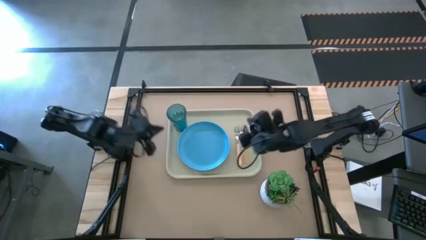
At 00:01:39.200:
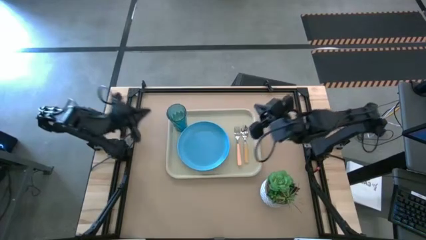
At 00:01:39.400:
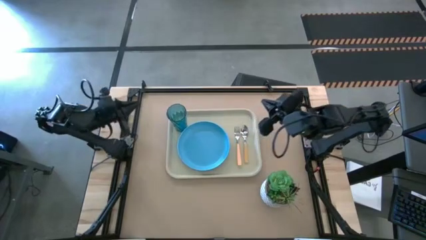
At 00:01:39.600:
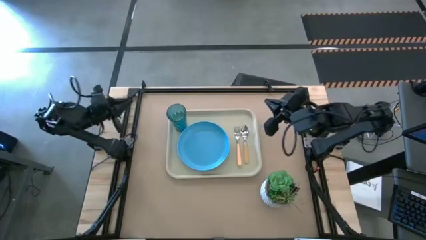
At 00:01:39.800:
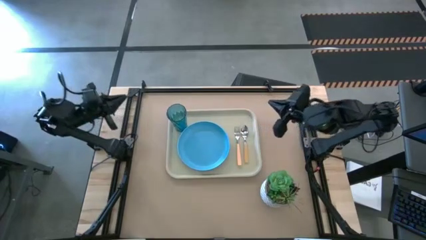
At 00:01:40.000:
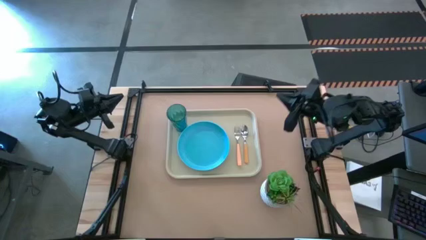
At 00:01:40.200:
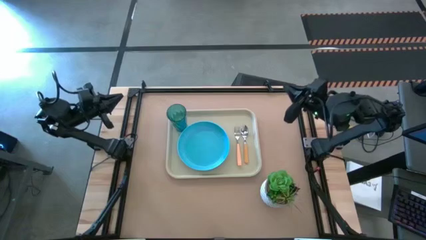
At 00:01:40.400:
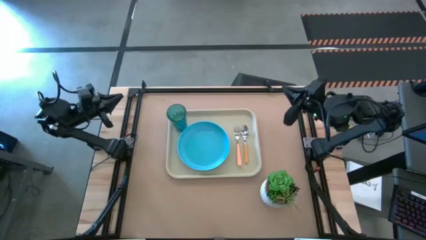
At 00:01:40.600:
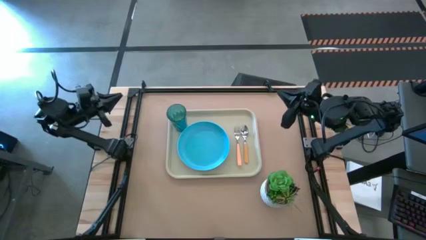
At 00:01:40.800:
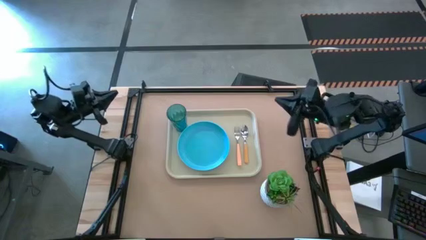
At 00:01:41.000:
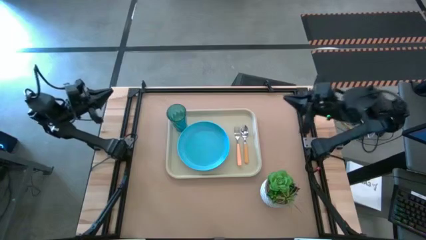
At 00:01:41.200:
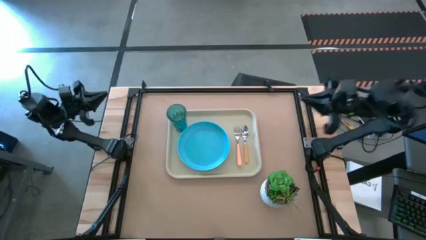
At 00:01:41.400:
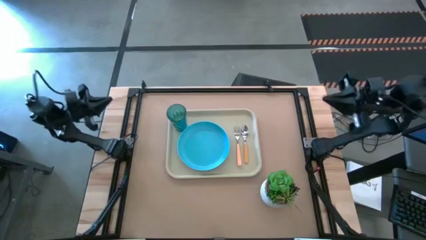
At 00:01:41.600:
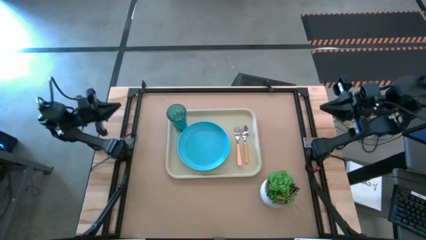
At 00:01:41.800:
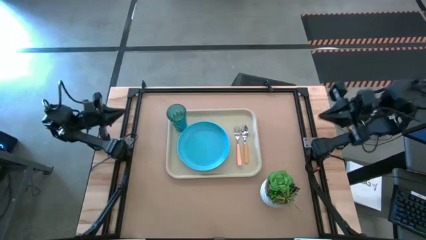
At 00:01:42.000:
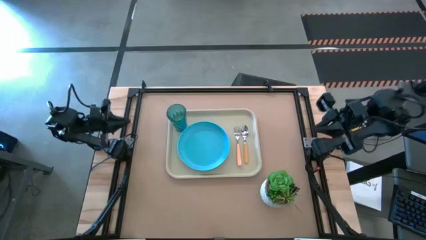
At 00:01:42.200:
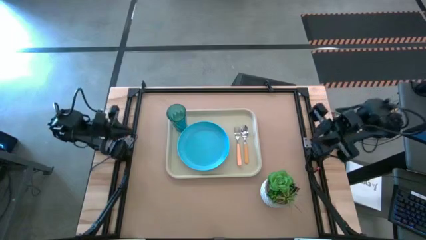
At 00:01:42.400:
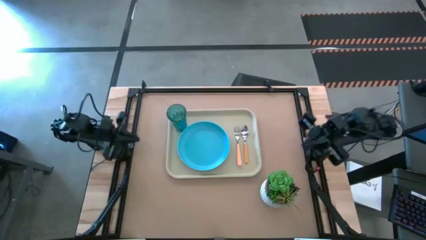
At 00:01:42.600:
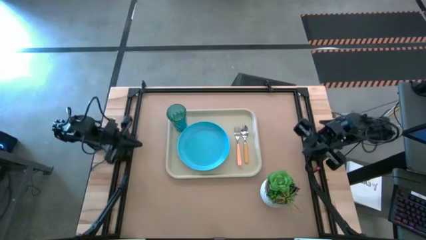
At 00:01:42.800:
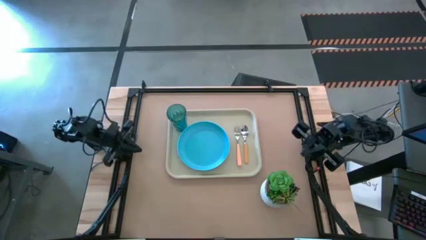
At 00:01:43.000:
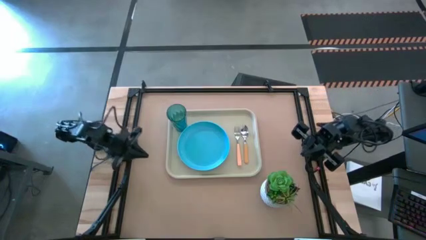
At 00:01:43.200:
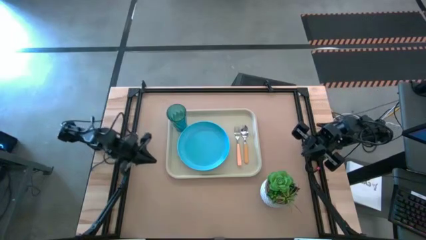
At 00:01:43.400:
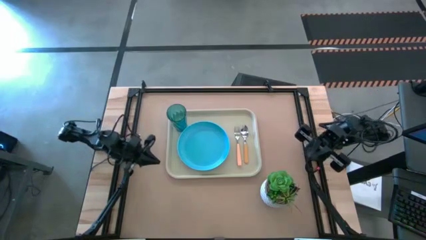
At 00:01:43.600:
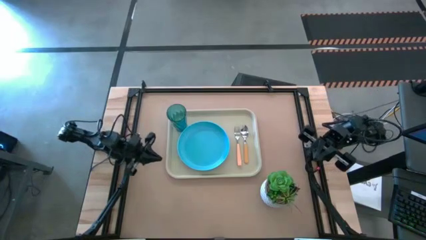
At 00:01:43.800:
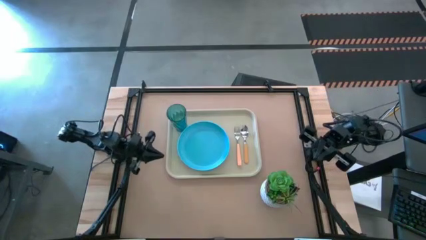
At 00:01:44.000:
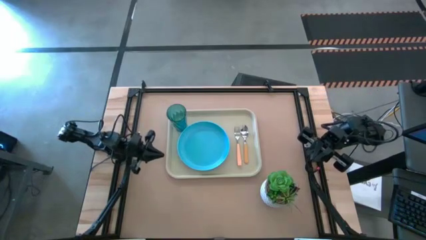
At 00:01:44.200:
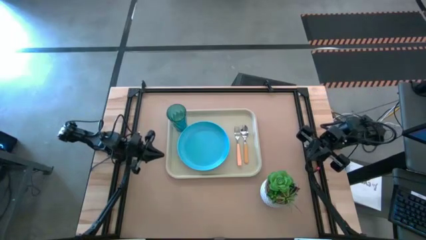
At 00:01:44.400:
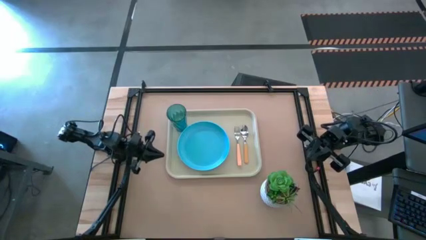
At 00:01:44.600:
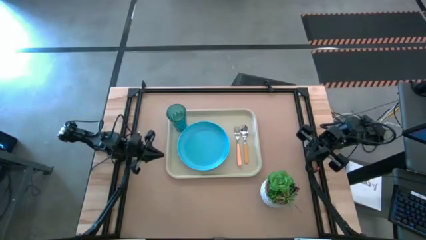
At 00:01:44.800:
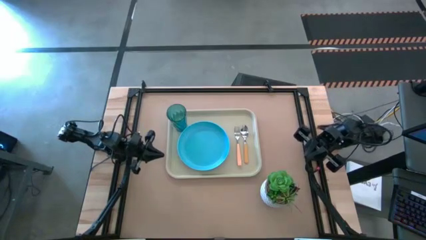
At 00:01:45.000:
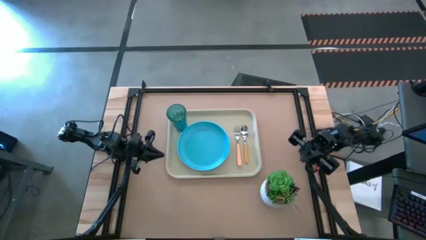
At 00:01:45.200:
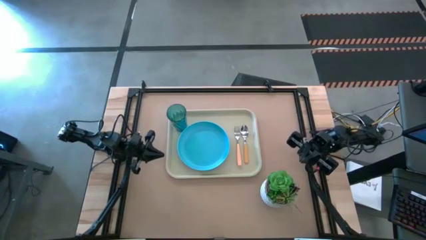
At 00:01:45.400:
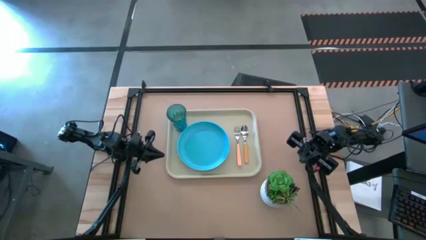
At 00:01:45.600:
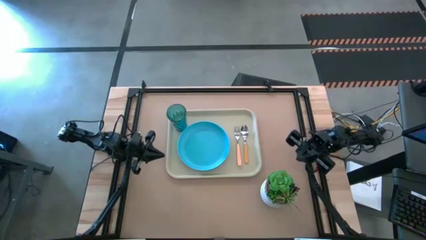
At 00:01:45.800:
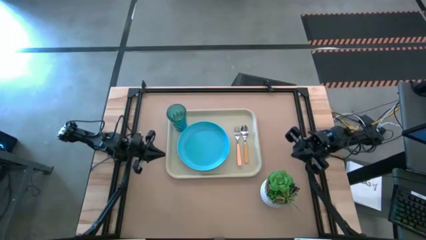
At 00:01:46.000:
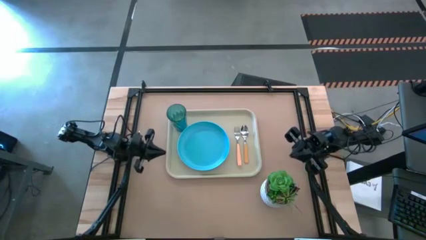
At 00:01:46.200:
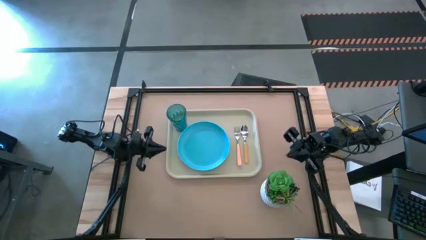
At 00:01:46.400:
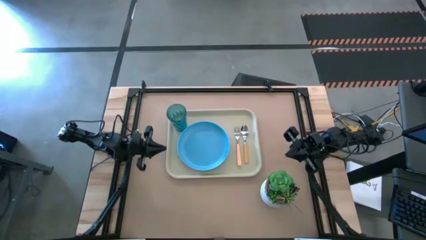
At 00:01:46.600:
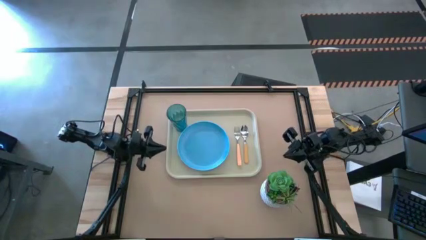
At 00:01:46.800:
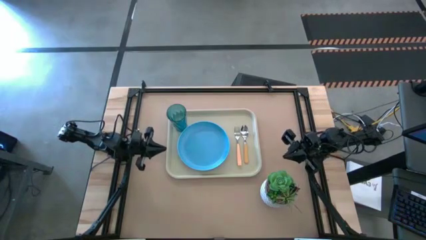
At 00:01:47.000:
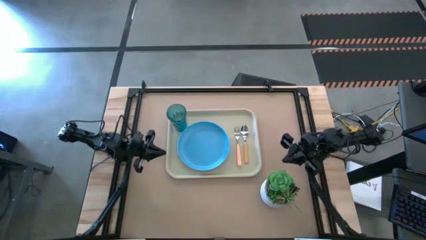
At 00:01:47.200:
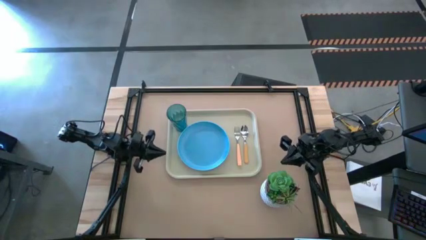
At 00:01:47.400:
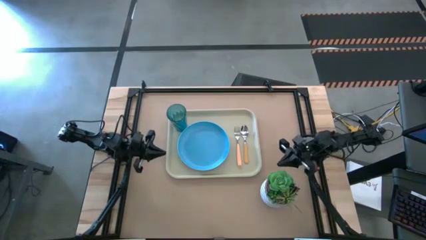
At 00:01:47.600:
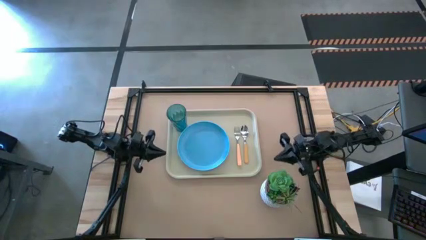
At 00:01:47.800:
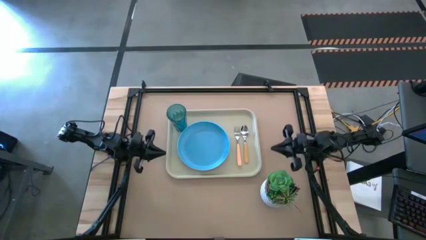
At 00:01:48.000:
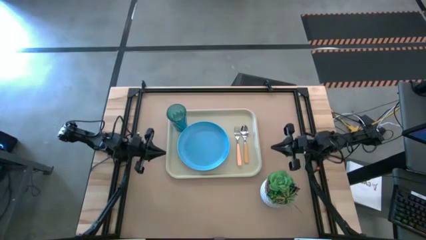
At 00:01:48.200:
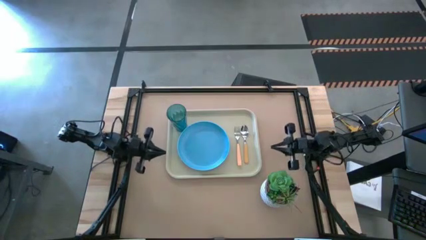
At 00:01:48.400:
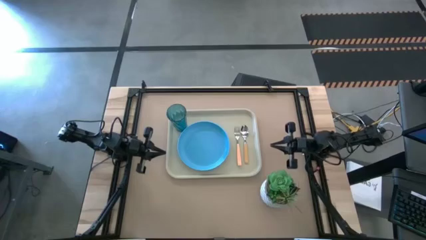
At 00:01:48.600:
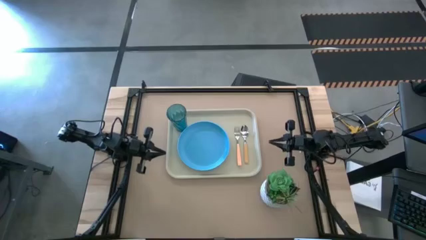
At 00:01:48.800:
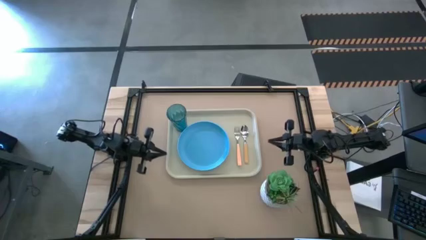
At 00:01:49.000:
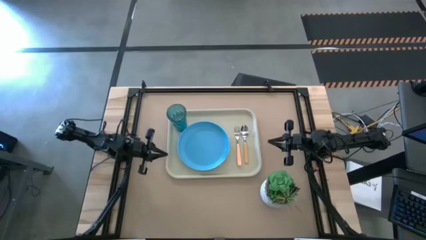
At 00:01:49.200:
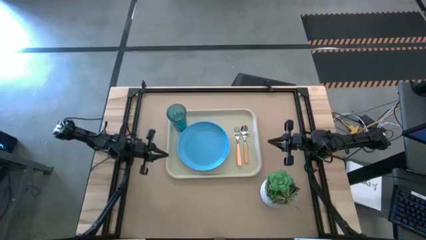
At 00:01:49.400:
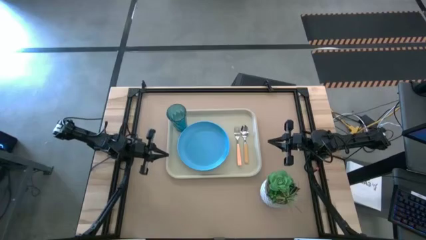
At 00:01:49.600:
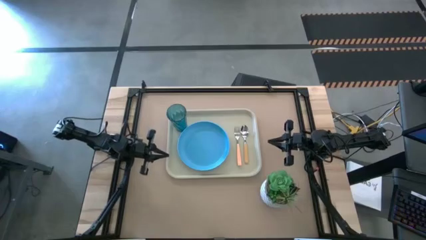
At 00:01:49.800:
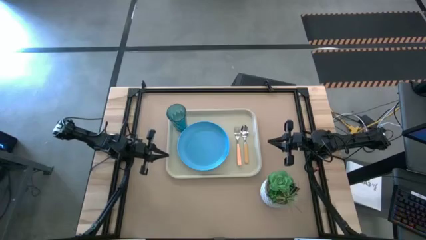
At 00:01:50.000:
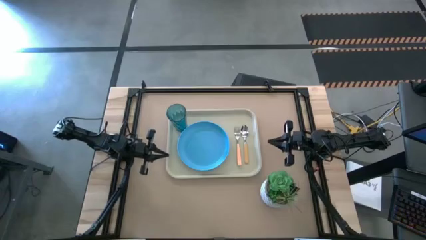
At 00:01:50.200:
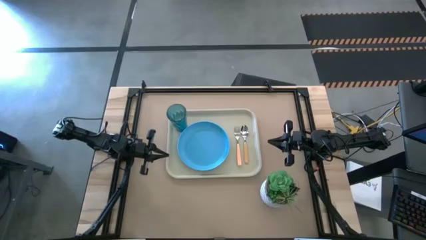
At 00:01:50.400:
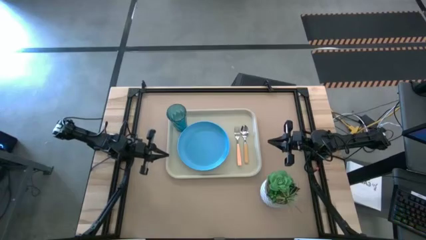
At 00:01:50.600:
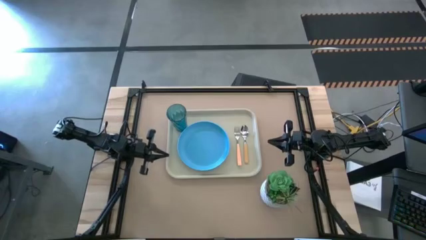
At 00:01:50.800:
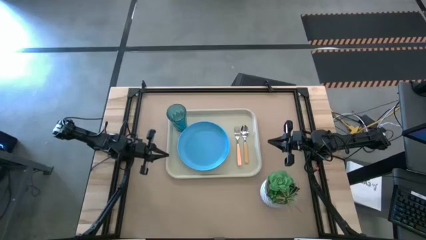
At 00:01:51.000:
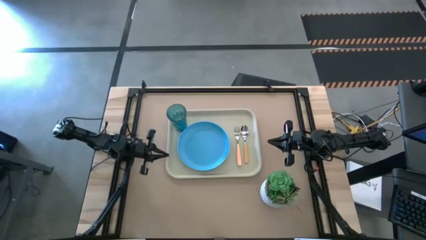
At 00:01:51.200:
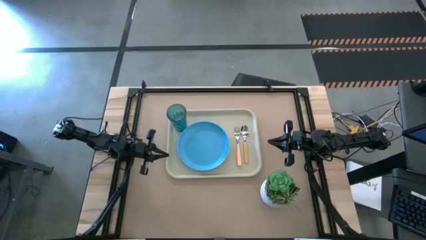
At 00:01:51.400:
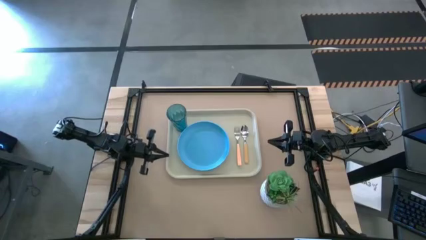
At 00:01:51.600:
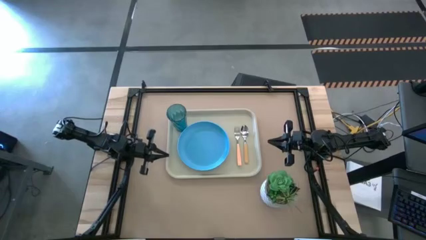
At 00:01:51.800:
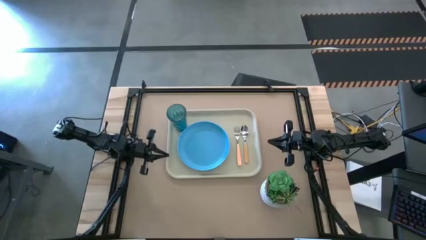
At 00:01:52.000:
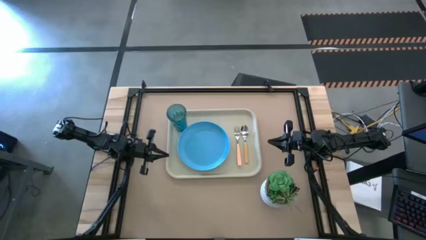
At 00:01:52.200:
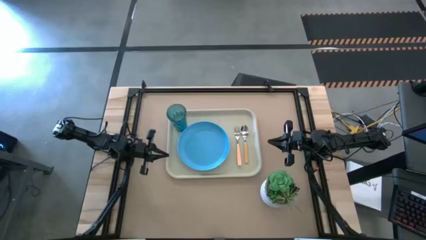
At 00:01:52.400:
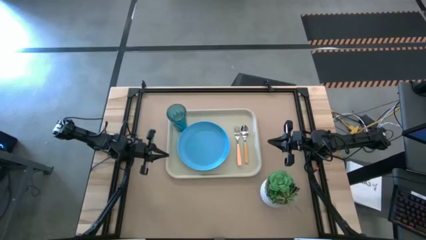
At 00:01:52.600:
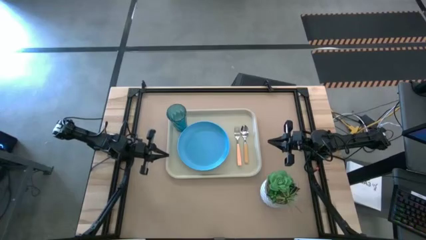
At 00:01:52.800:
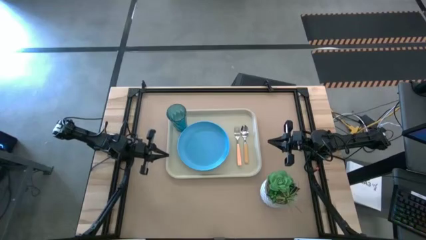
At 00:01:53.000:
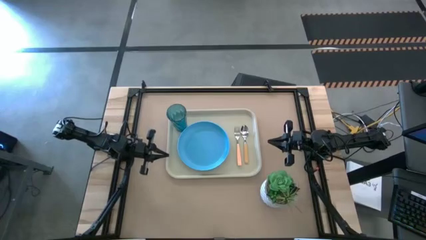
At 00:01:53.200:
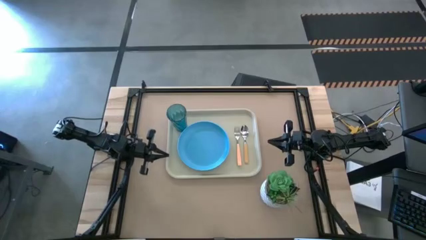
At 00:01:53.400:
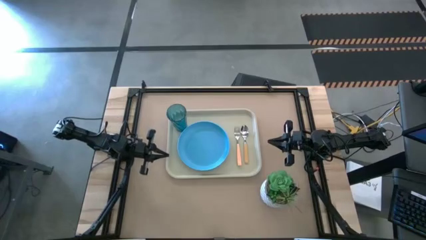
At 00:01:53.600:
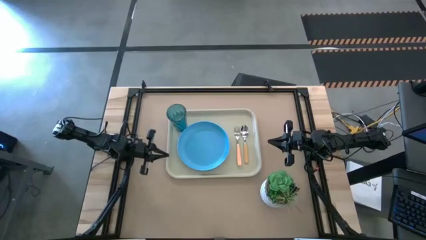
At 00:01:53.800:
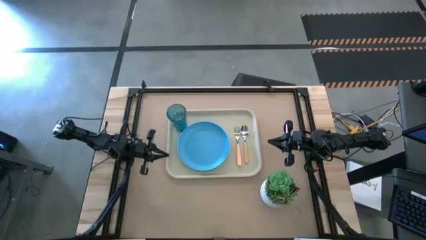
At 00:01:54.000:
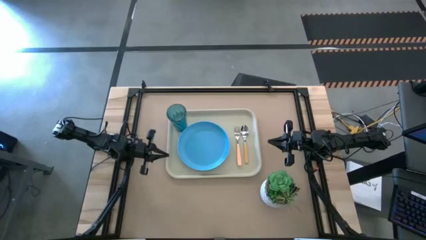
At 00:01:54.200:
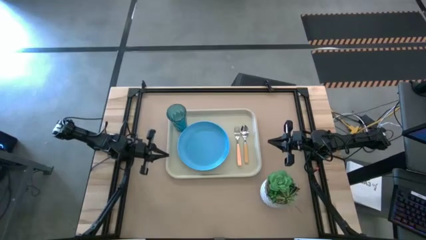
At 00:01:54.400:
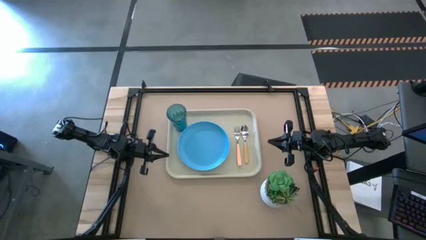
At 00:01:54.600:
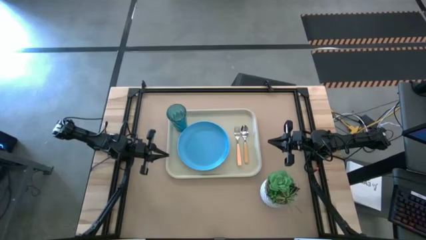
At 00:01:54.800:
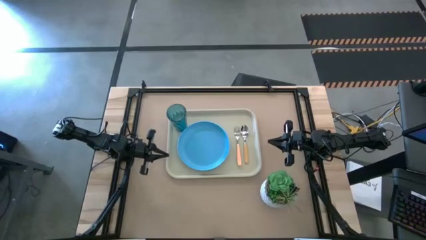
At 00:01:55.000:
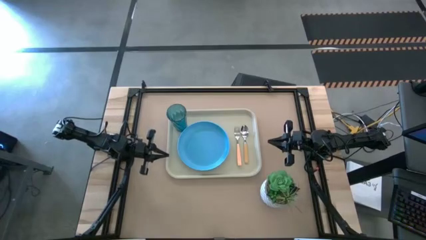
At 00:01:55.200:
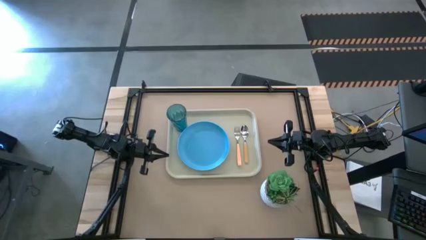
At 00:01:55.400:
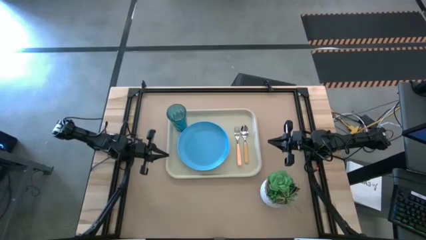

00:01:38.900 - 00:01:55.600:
Task: Pick and place plate/cup/fork/spoon on tray
Return to Home Position
